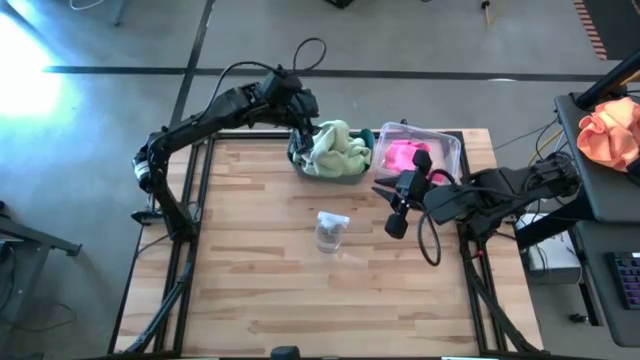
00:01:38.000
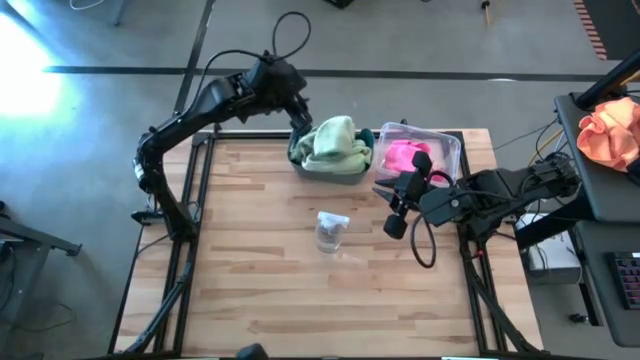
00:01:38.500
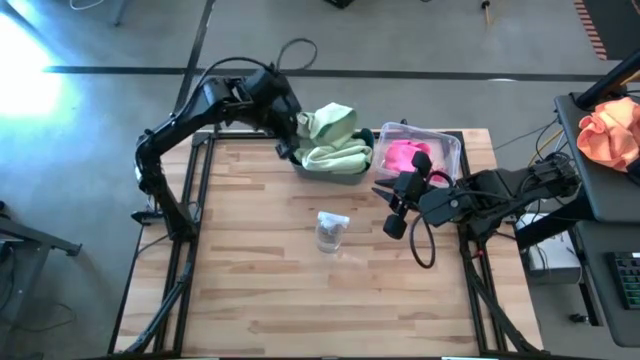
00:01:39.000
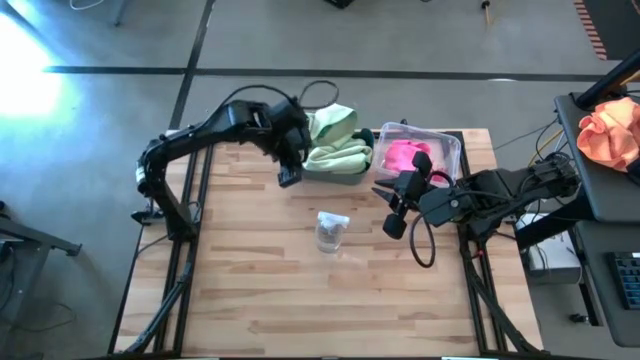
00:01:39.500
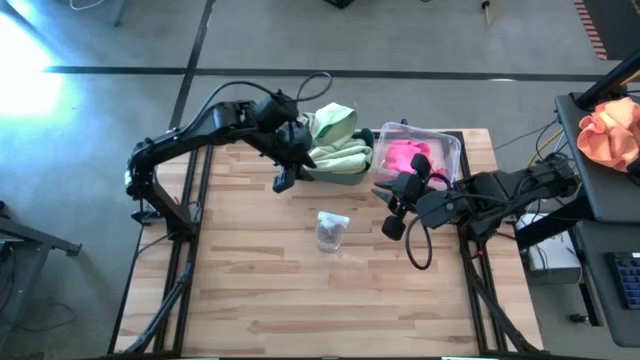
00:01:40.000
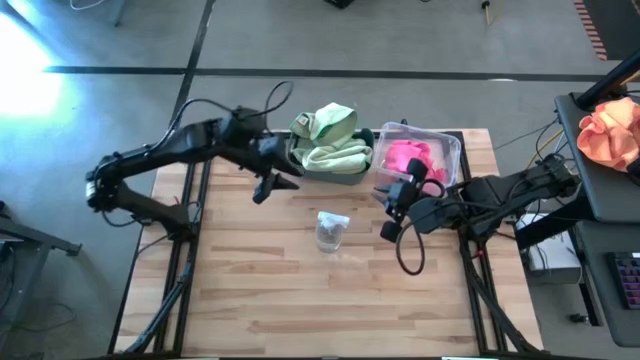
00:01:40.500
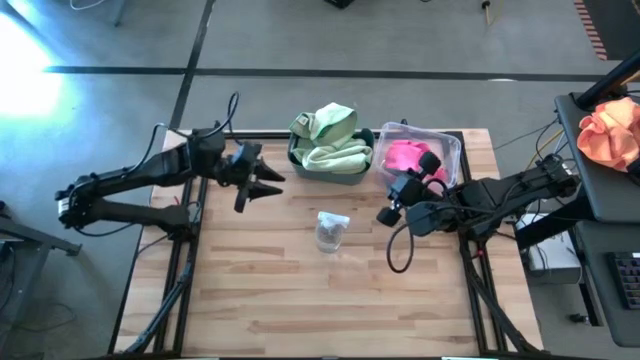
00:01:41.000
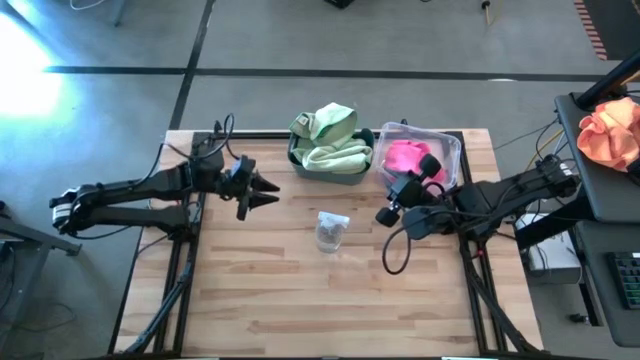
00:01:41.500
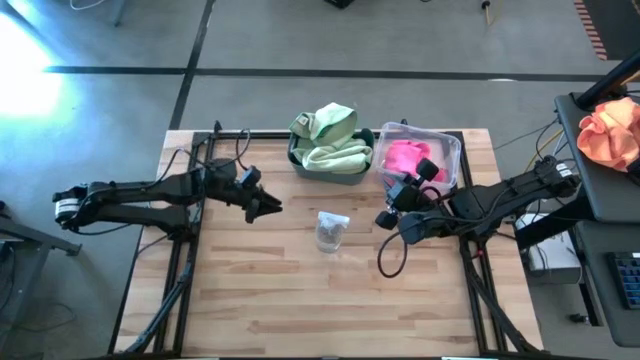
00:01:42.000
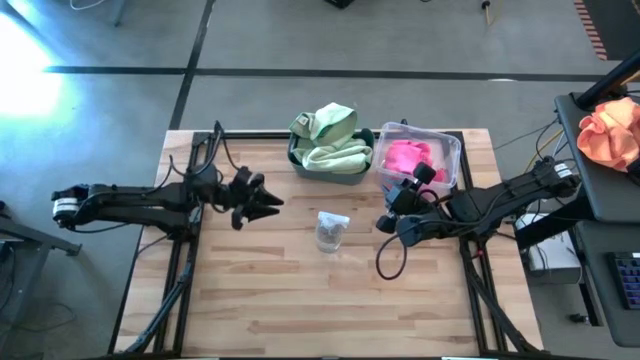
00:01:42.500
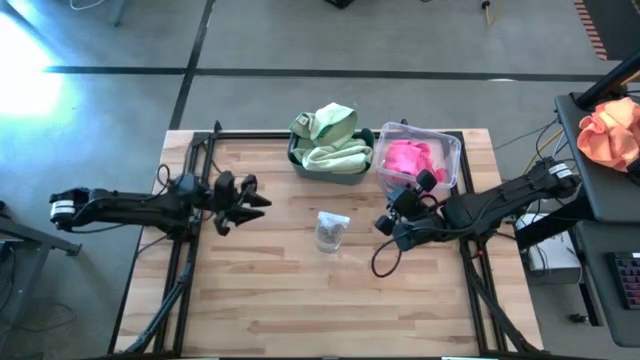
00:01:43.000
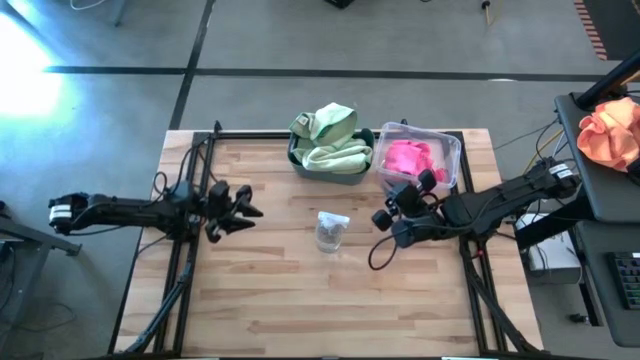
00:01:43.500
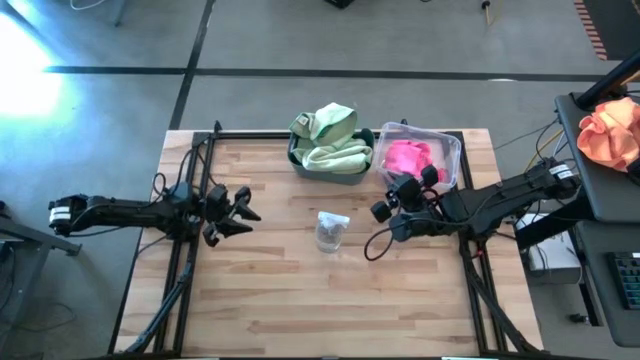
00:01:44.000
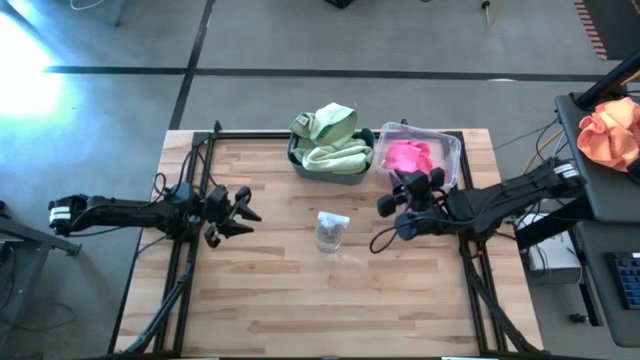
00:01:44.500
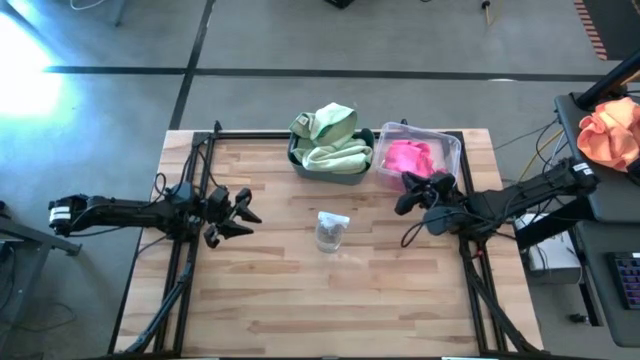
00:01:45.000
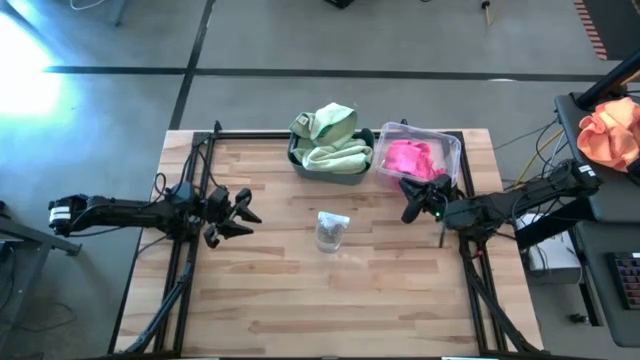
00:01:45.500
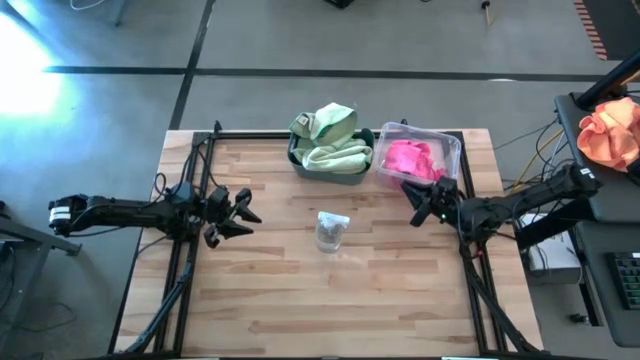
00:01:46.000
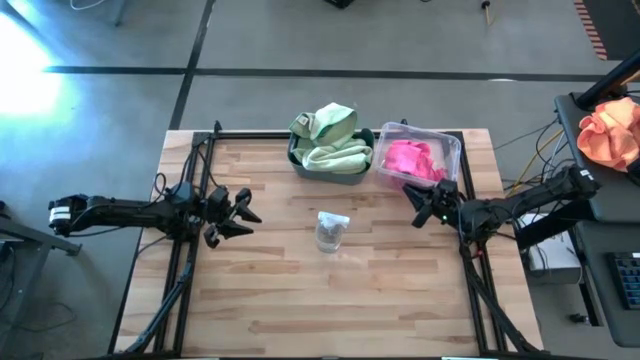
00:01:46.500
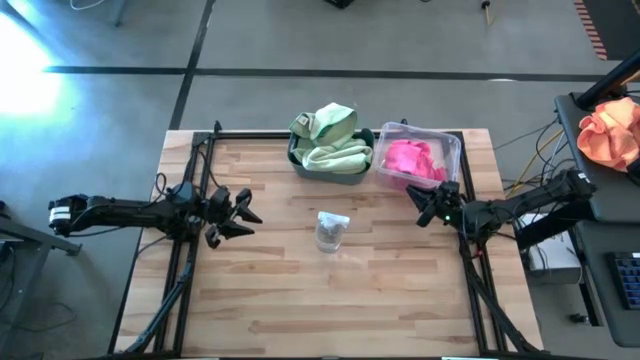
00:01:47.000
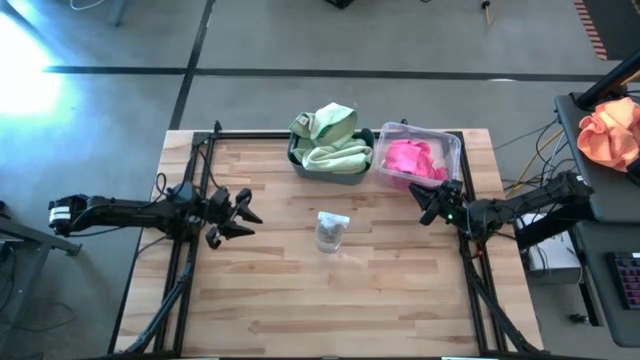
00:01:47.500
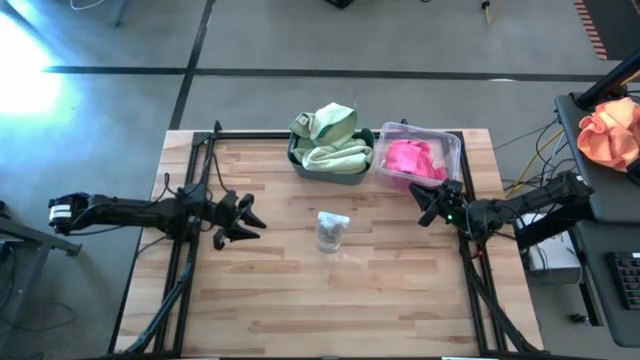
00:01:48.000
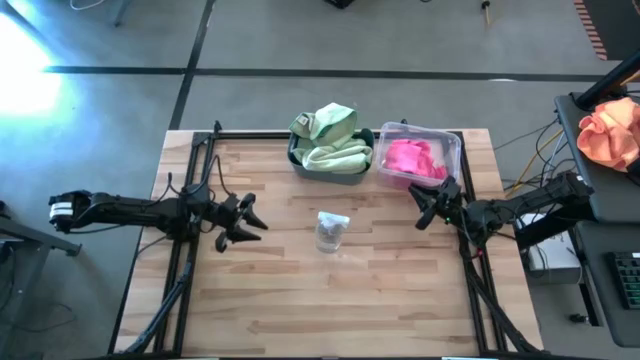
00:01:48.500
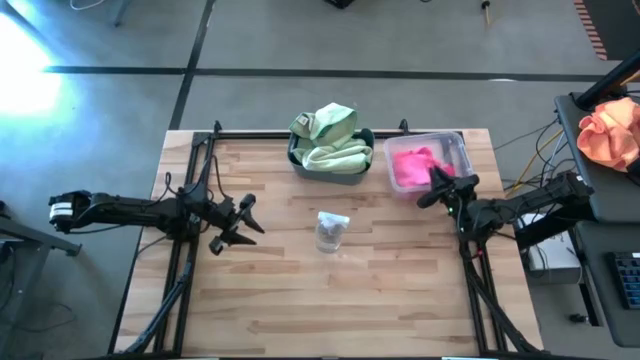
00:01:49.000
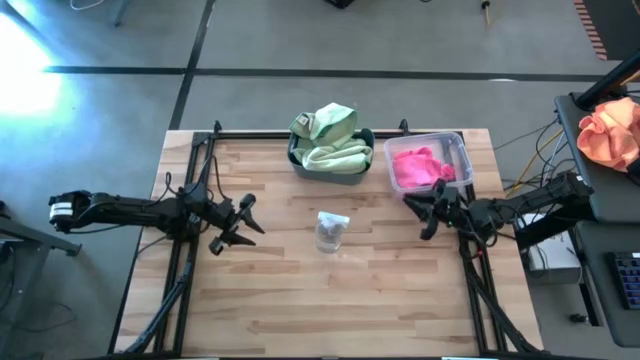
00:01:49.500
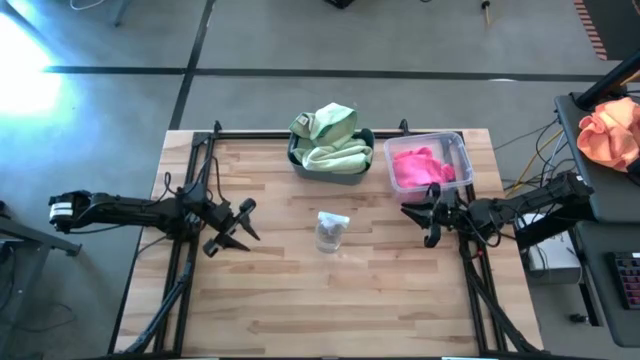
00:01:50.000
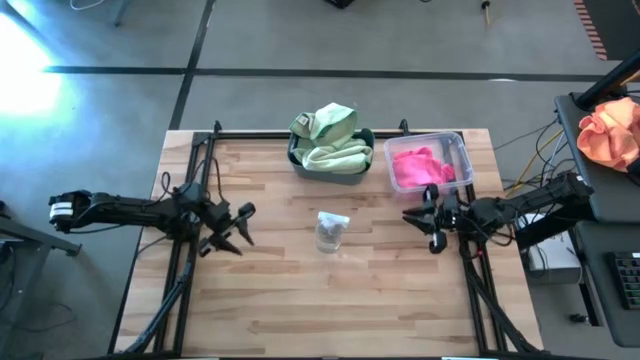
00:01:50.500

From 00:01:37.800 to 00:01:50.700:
Task: Sort microfiber towel by color & place in baskets
Return to Home Position

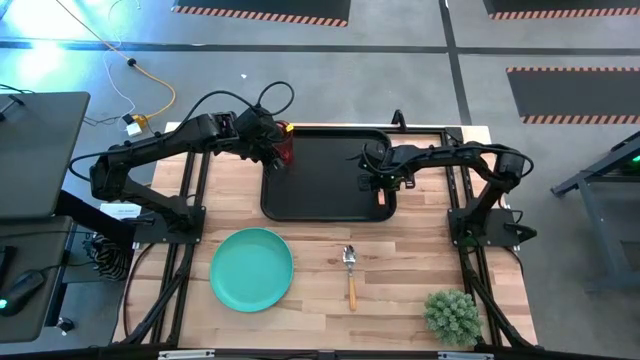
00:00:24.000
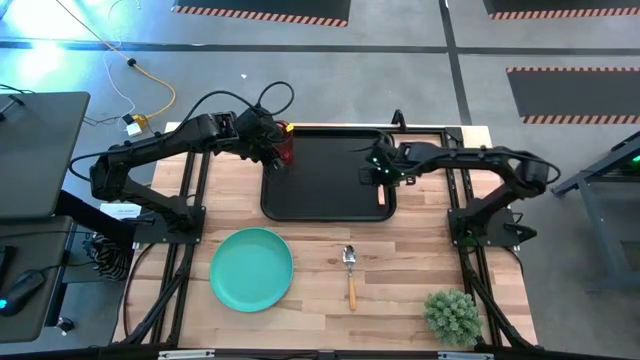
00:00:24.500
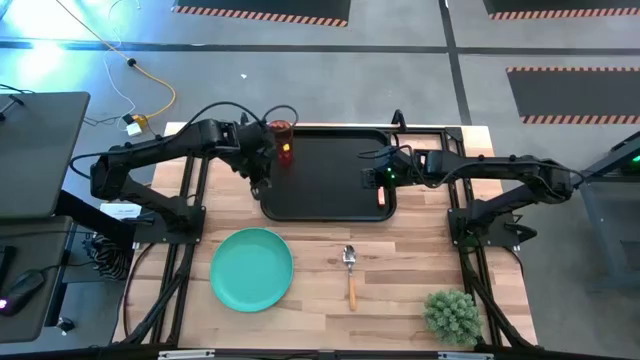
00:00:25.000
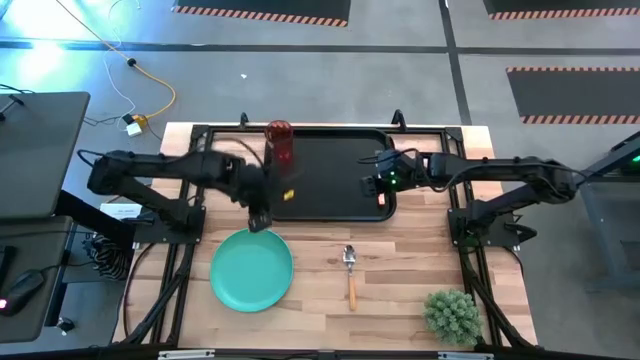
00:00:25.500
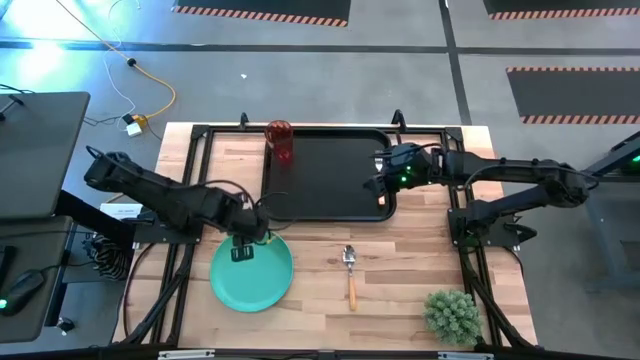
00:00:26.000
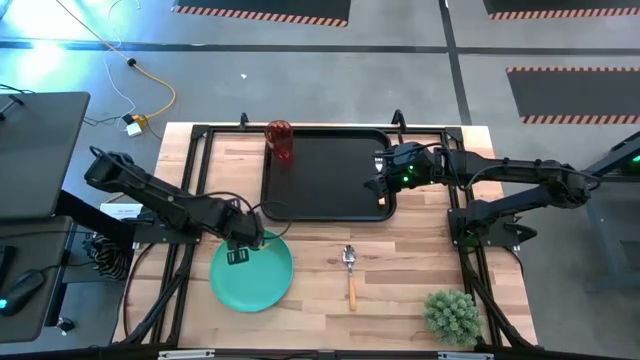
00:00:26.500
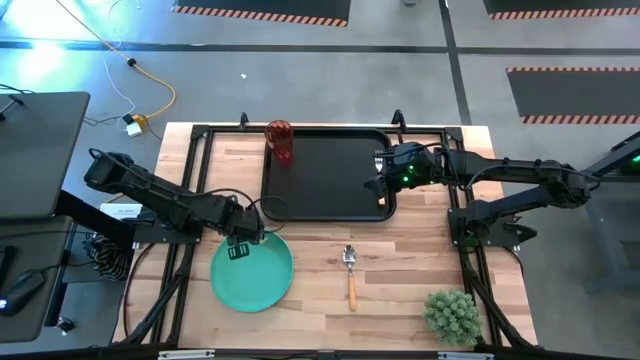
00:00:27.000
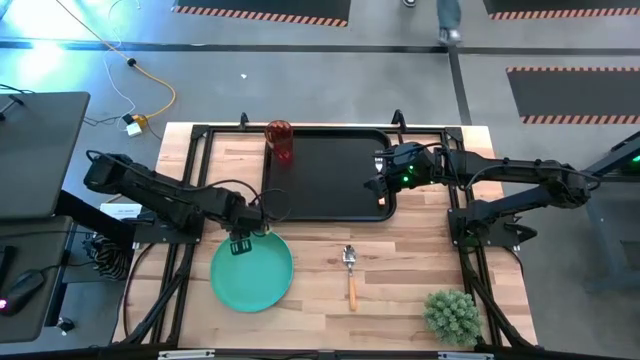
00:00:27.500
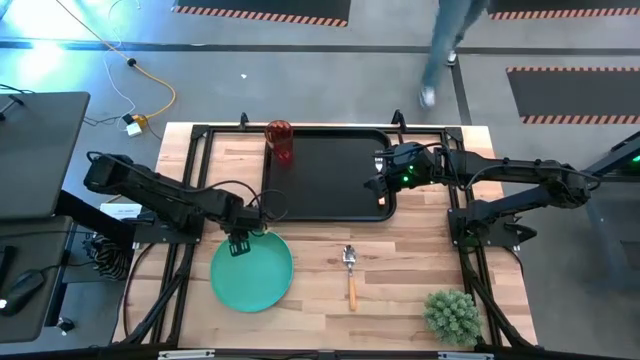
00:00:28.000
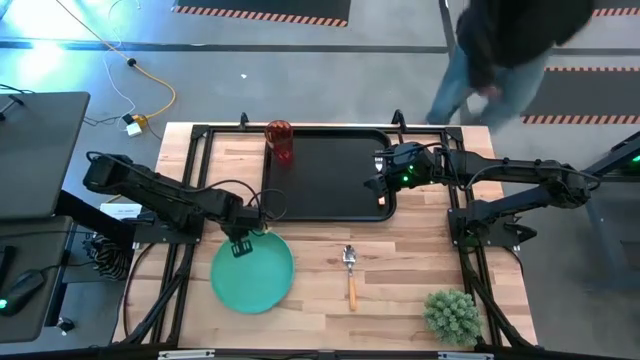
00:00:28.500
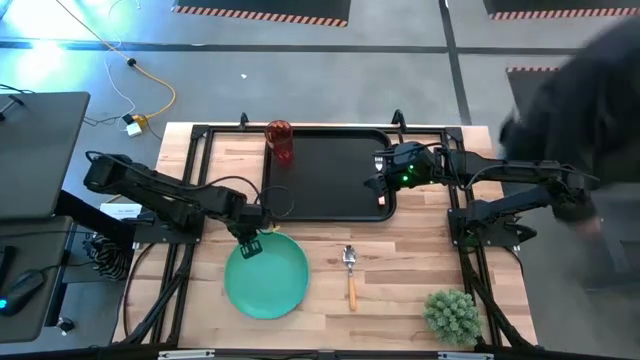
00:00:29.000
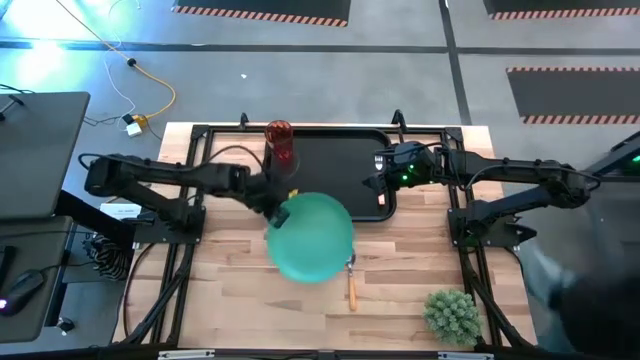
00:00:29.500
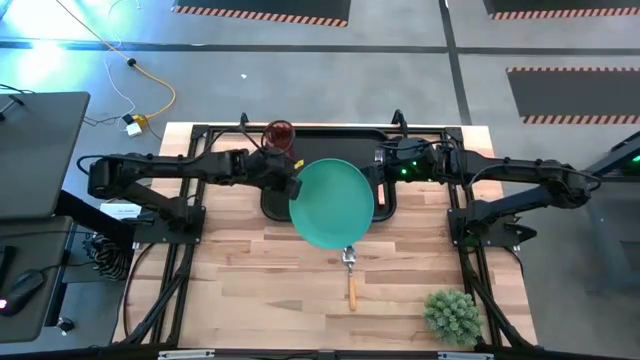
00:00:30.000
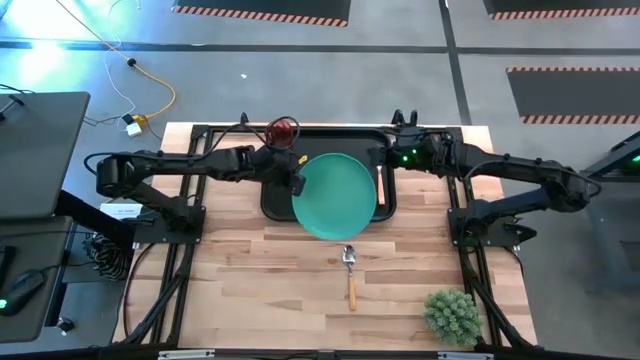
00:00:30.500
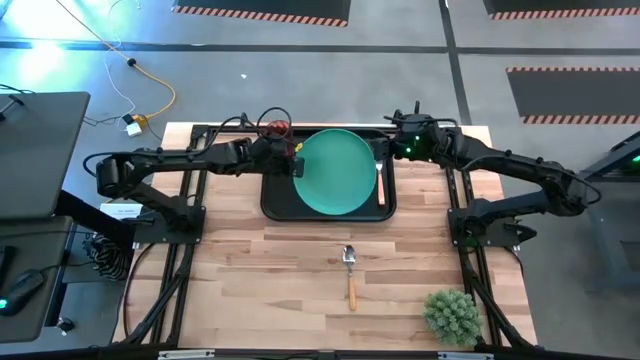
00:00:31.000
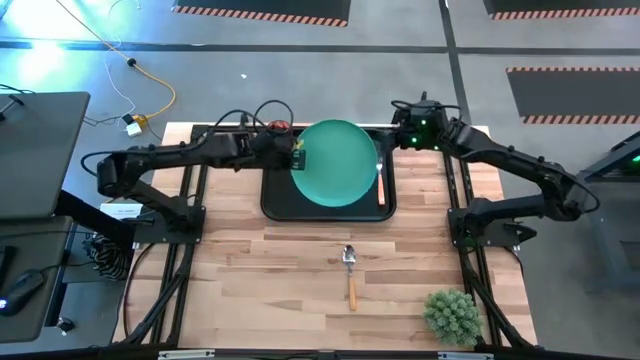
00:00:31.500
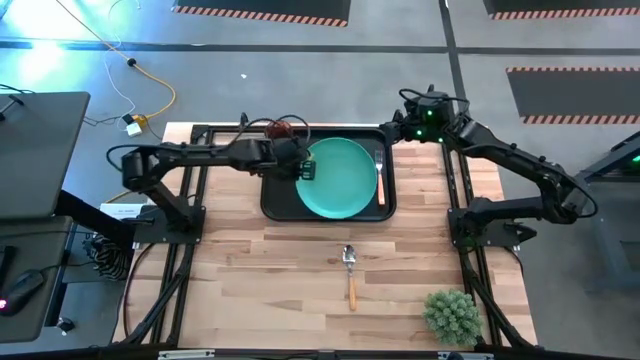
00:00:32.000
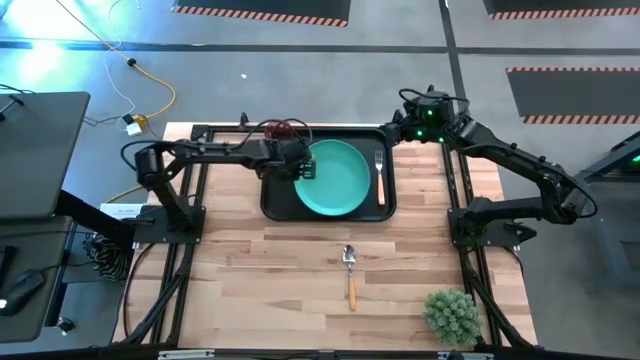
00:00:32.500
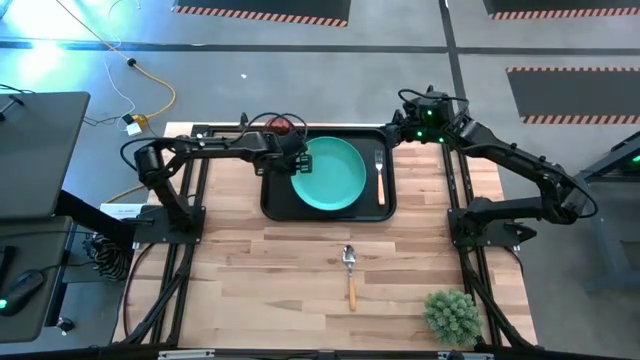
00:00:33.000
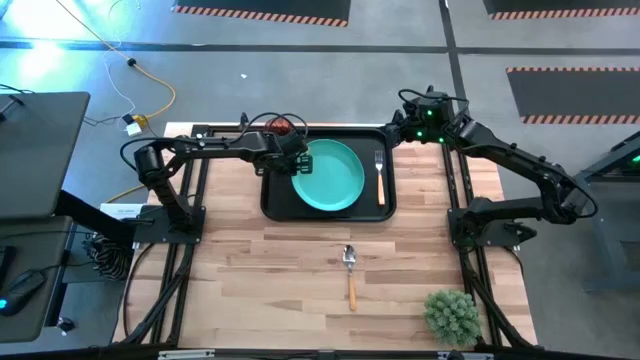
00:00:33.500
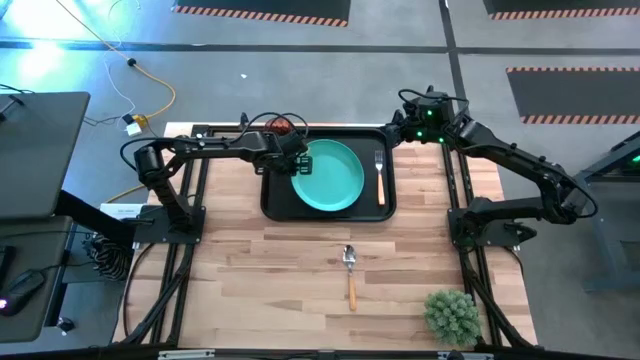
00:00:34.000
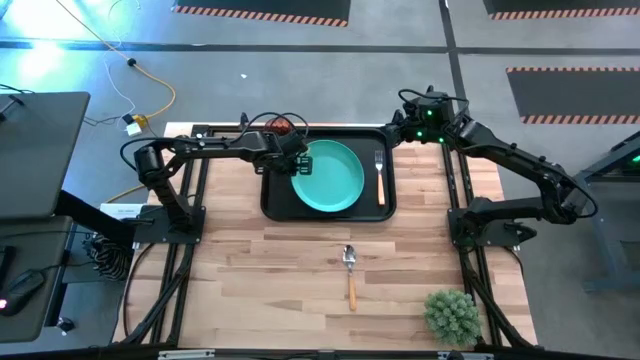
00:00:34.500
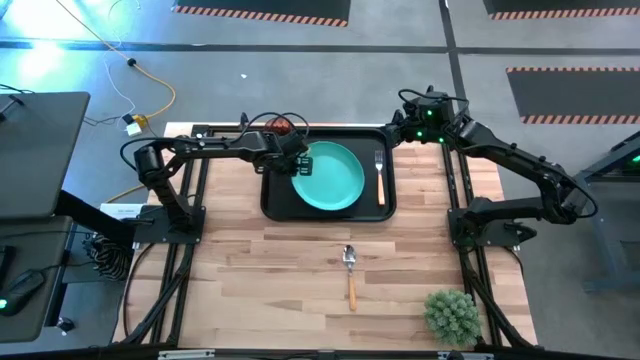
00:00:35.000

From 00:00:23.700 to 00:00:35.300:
Task: Pick and place plate/cup/fork/spoon on tray
Put the blue plate on the black tray to the bottom right of the orange cup
